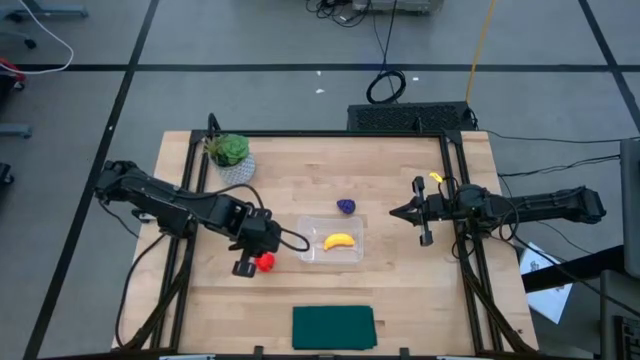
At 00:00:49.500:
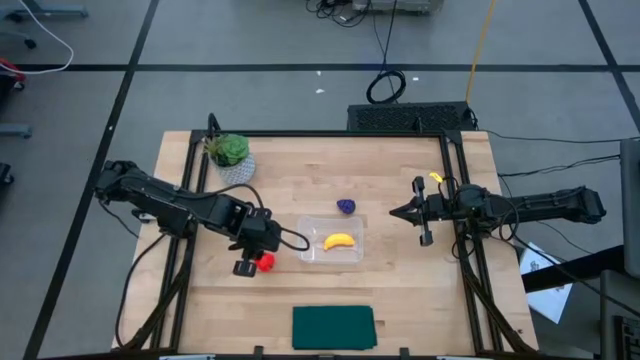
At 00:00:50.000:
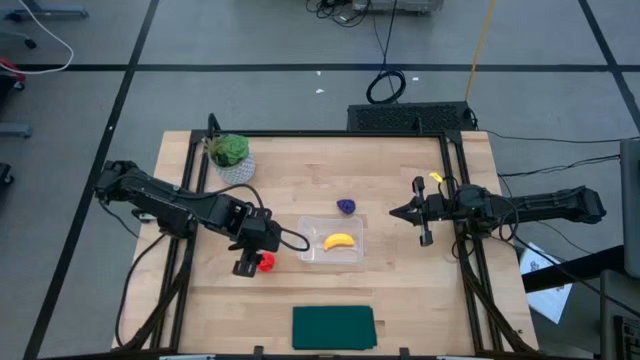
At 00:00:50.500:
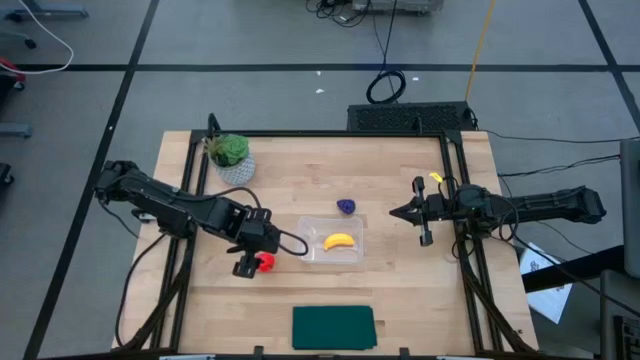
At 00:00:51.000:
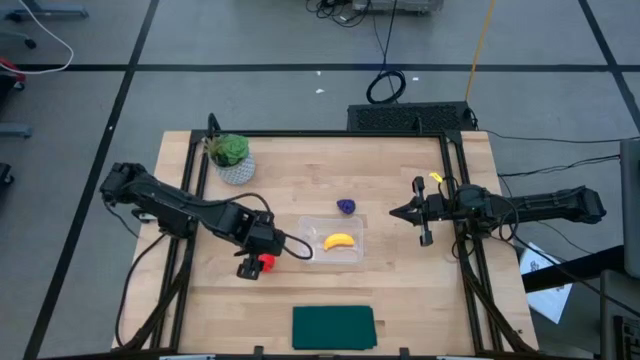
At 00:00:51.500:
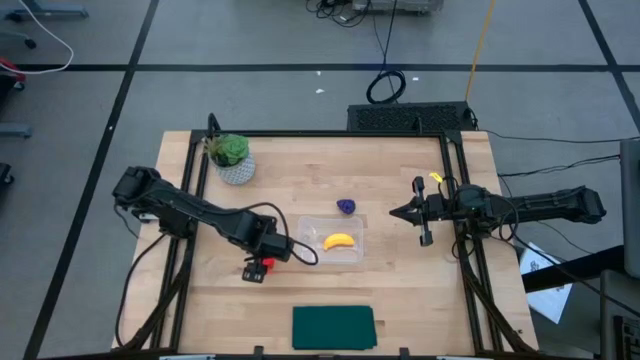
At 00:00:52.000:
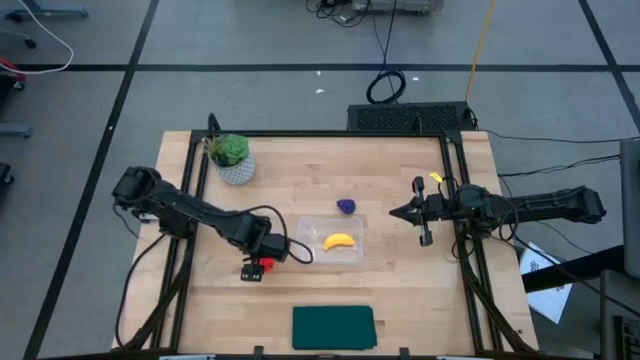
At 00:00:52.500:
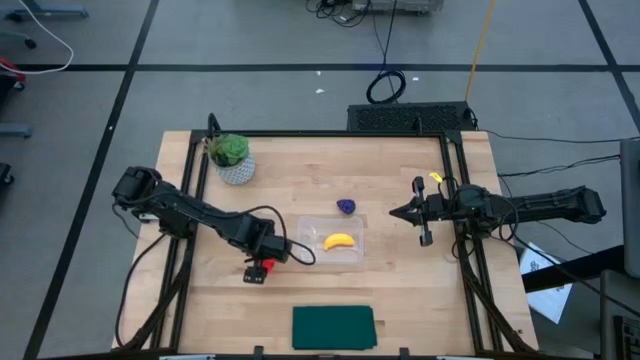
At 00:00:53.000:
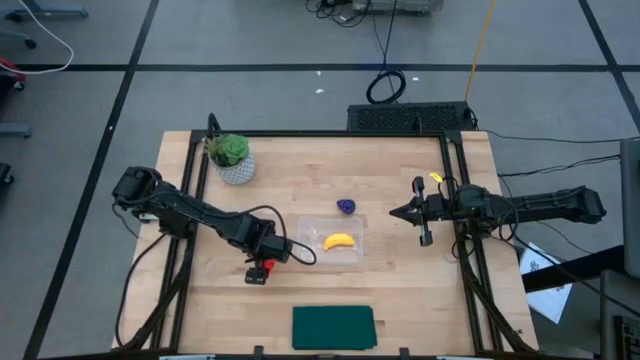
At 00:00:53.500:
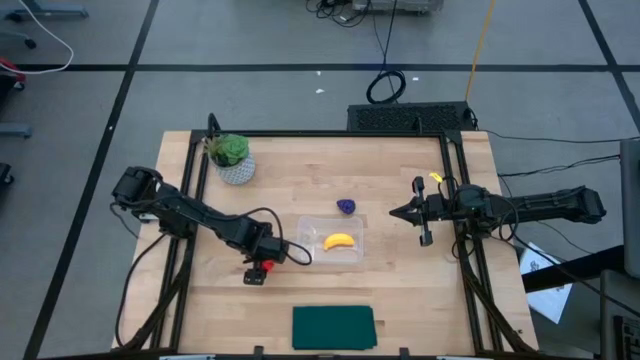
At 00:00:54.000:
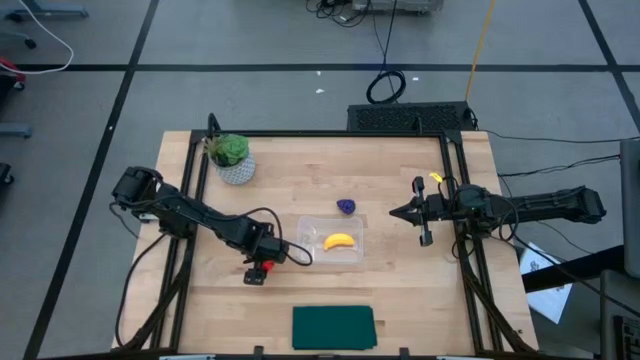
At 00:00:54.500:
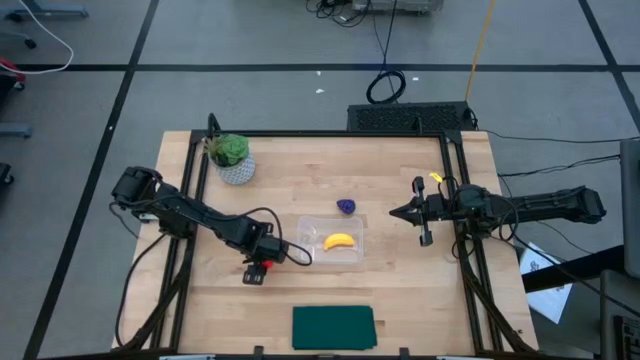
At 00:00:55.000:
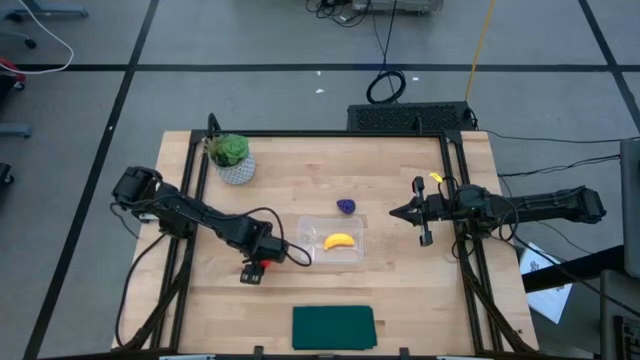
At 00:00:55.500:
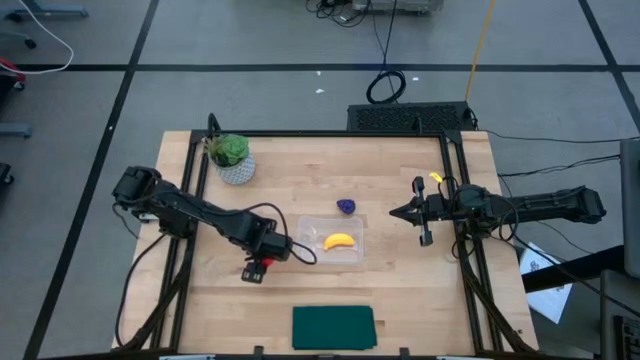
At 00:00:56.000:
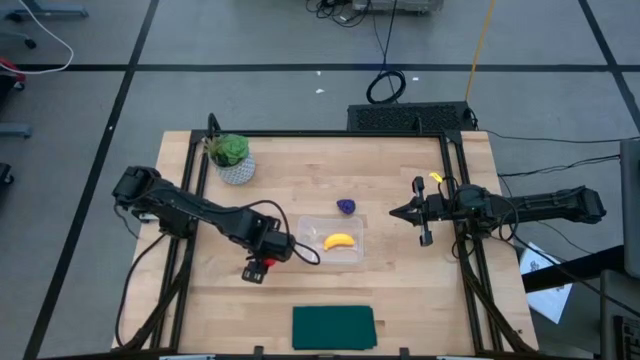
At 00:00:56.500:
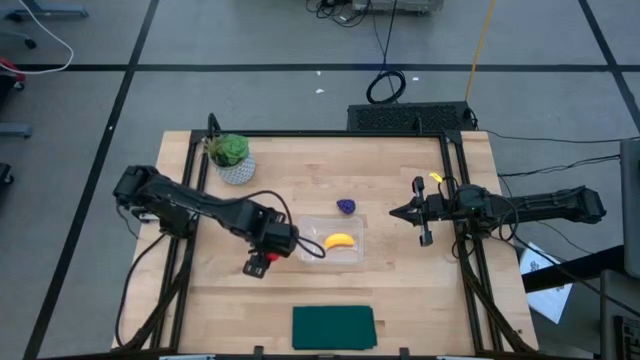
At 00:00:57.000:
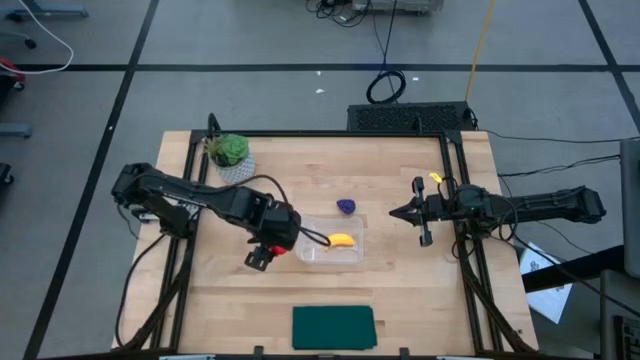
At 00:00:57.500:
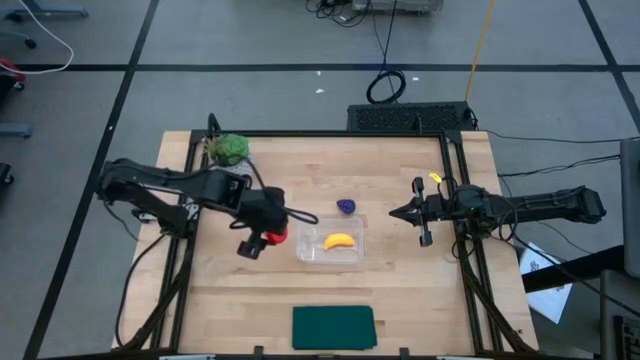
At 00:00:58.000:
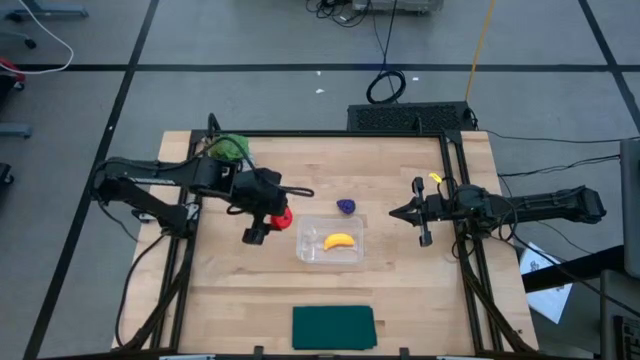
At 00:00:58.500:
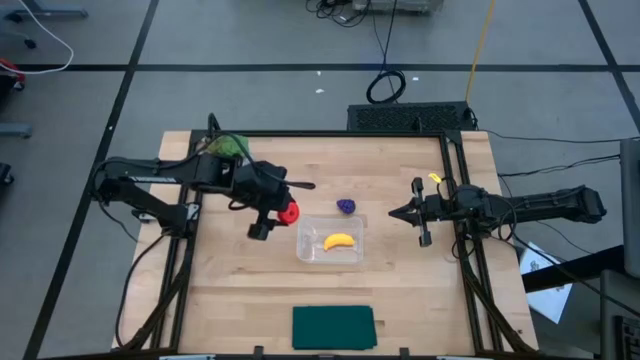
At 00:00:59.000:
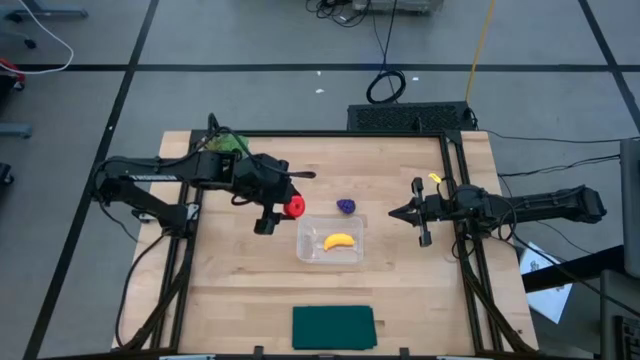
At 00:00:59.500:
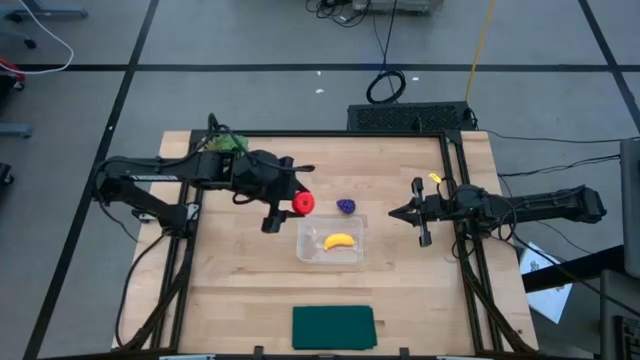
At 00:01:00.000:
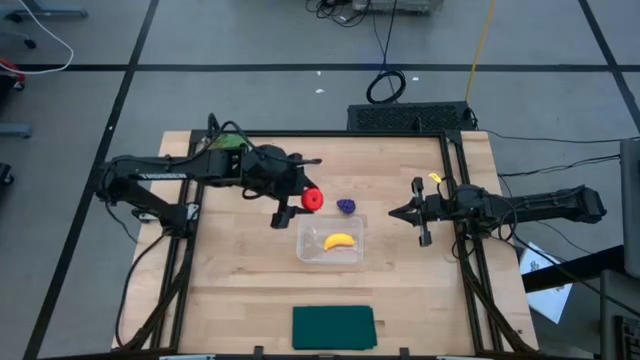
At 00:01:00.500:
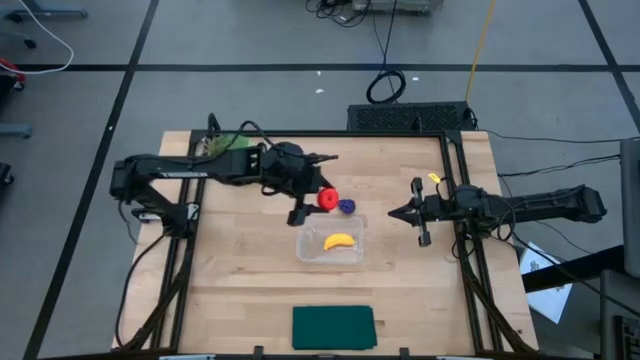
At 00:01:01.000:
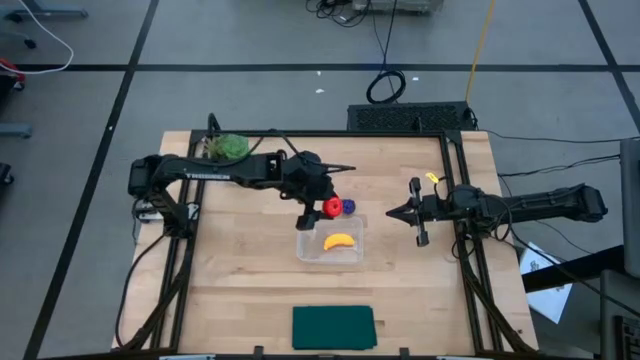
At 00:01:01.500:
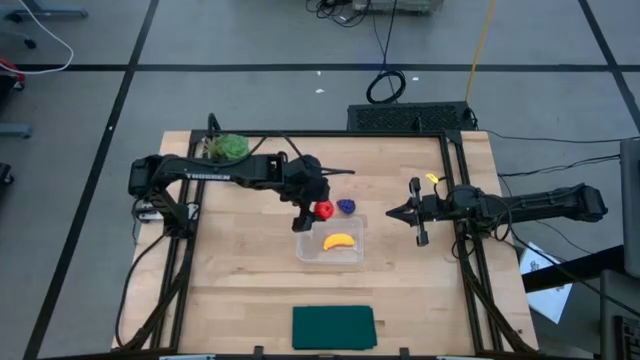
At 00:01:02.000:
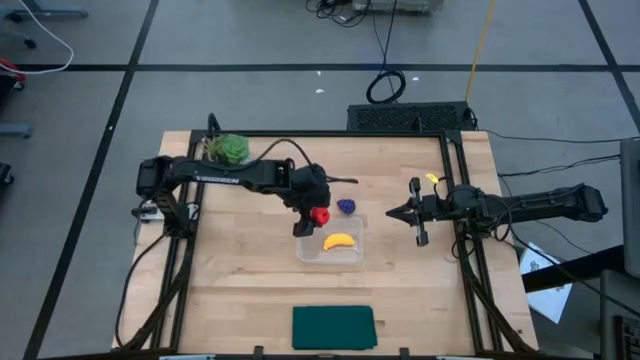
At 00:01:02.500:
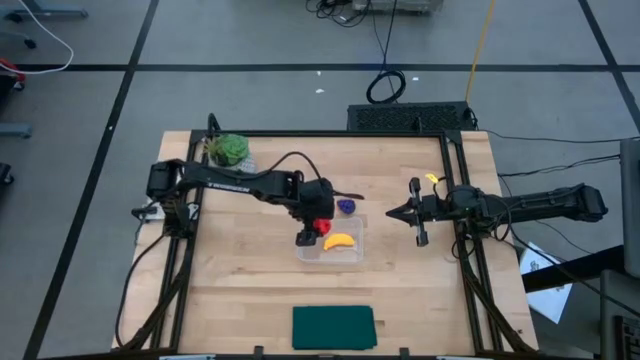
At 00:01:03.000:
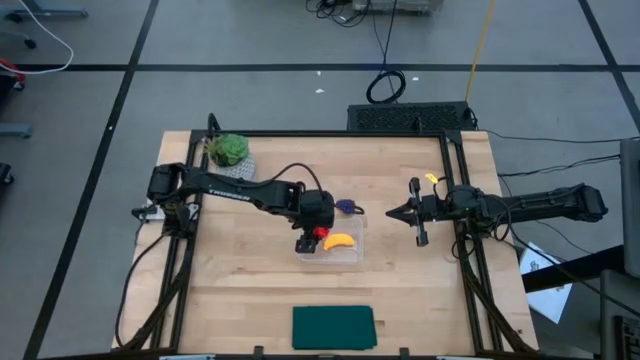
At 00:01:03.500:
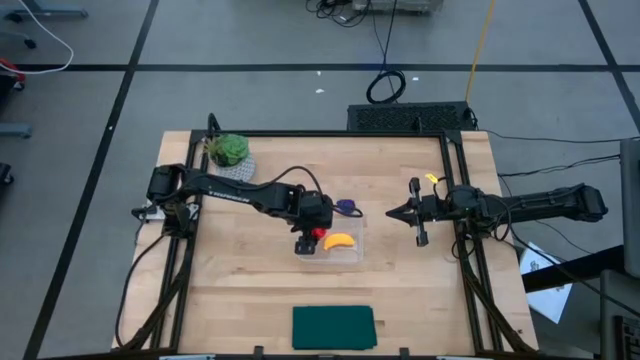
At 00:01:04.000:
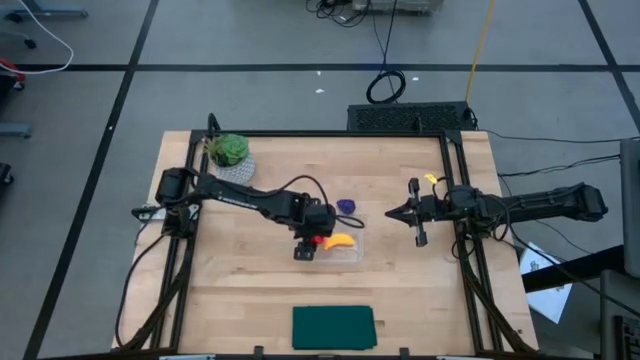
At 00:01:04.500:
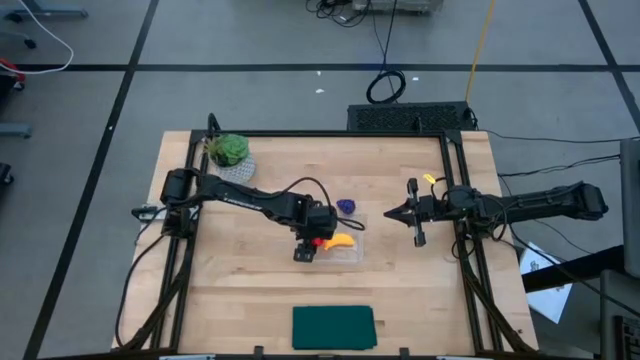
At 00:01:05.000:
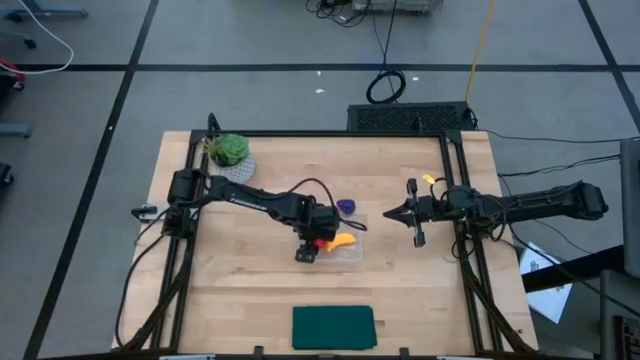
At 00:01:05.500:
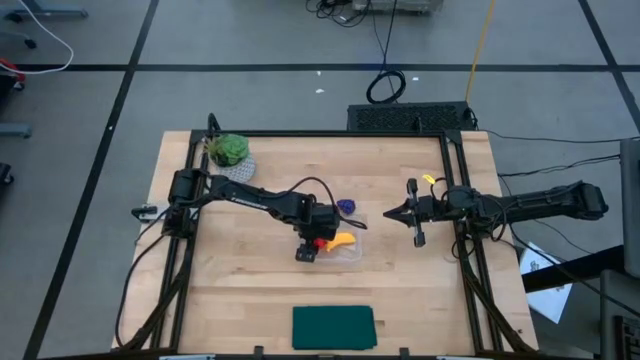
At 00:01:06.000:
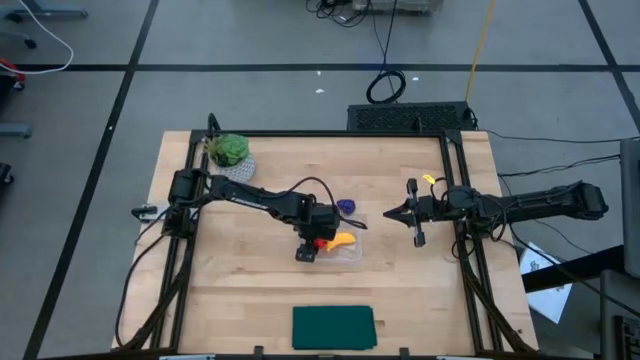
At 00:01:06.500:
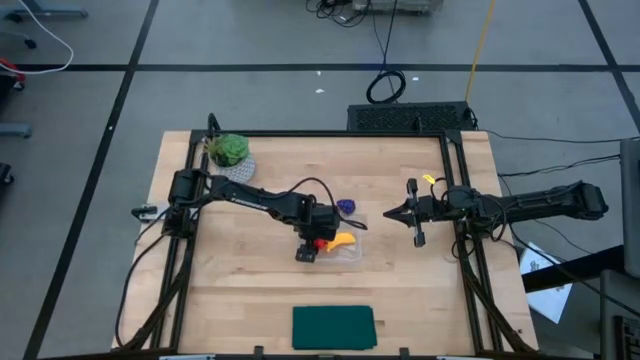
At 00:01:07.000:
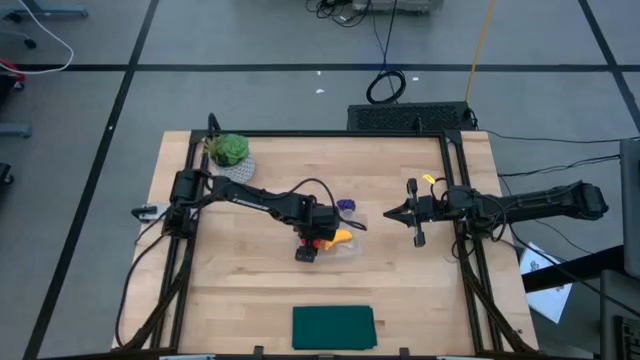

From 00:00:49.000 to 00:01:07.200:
Task: Pick and placing Produce into tupperware
Put the apple into the transparent bin
